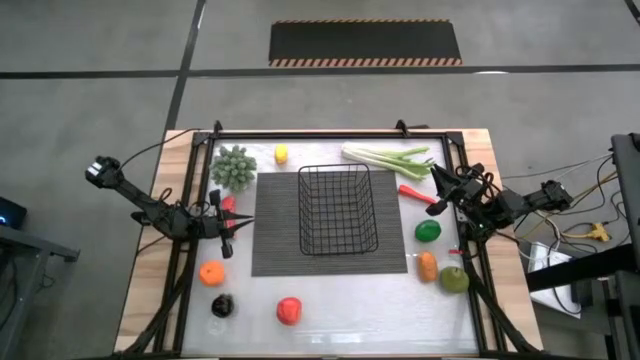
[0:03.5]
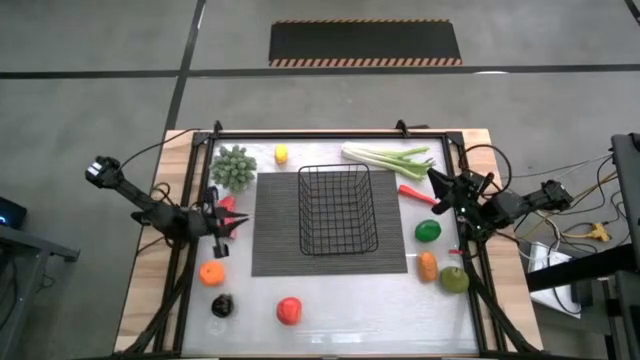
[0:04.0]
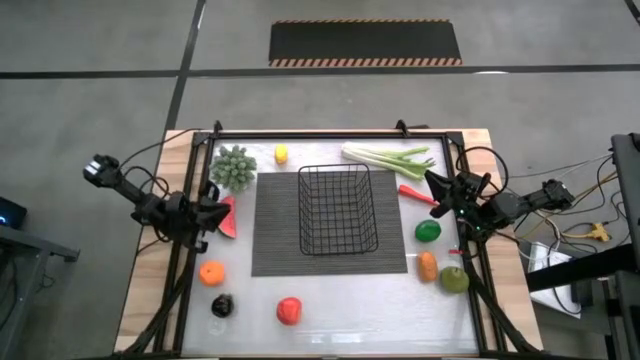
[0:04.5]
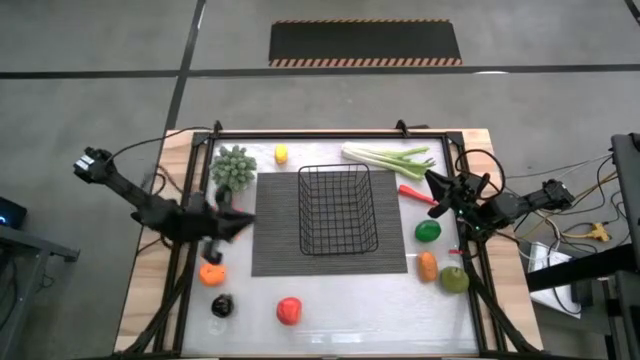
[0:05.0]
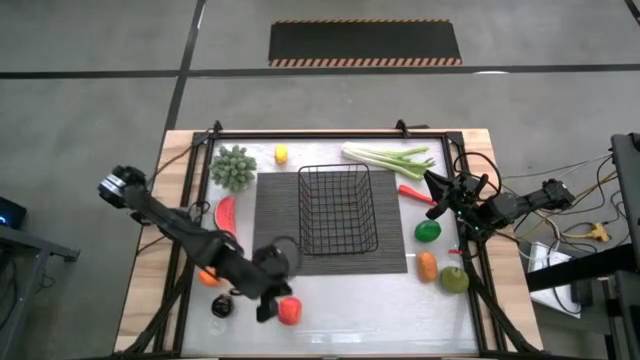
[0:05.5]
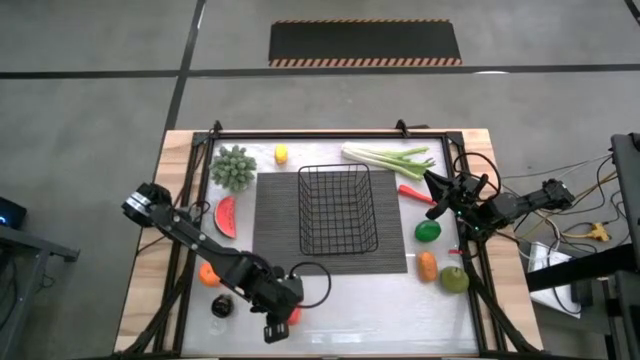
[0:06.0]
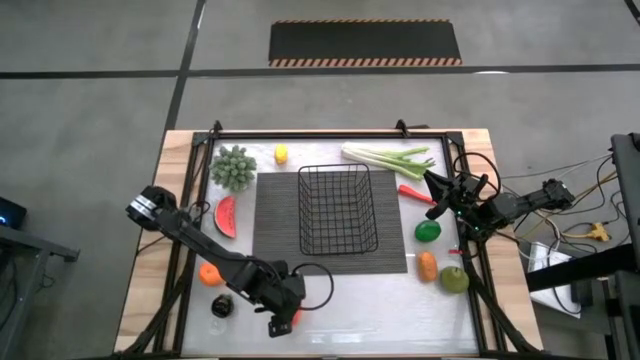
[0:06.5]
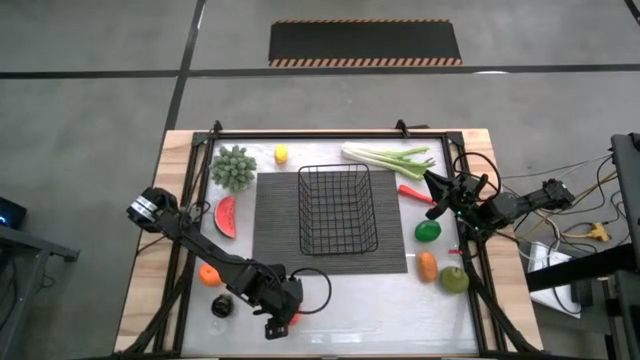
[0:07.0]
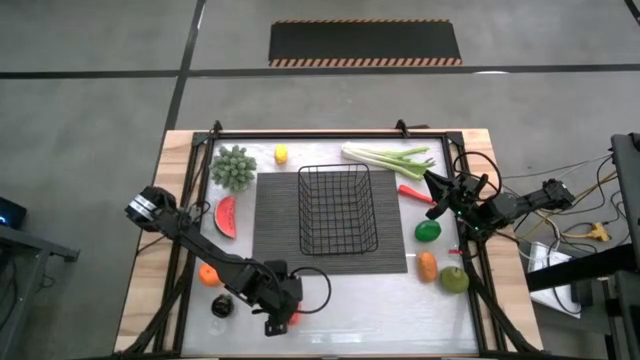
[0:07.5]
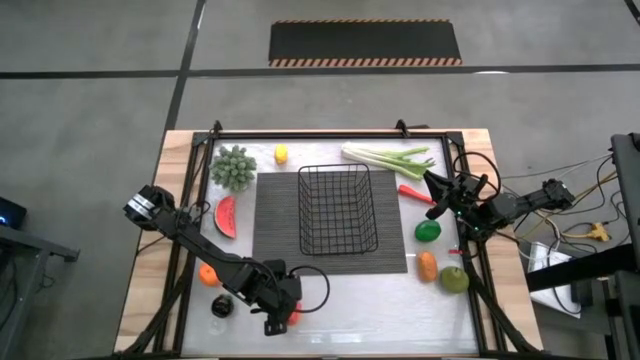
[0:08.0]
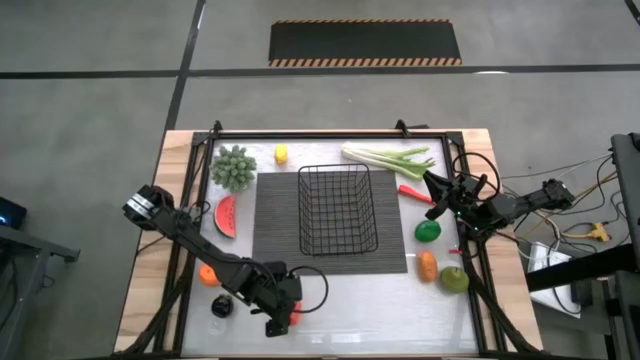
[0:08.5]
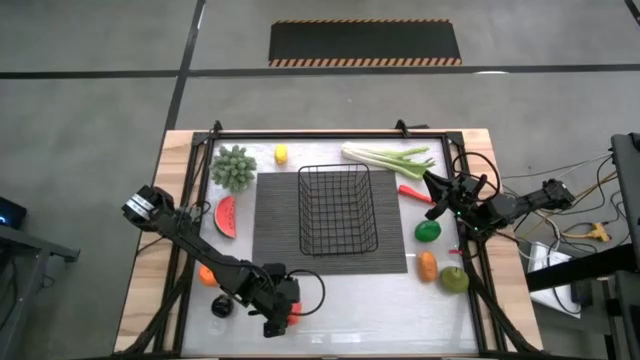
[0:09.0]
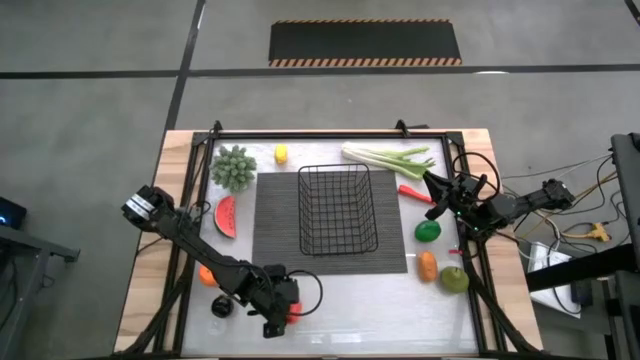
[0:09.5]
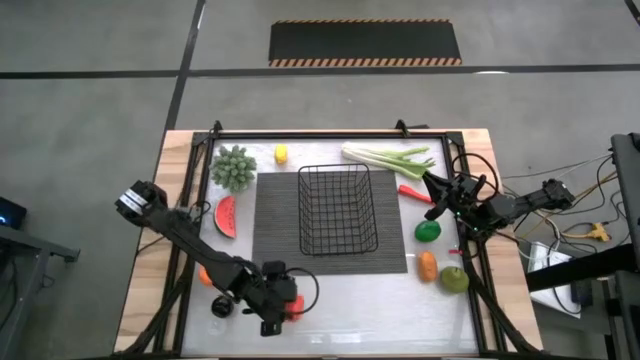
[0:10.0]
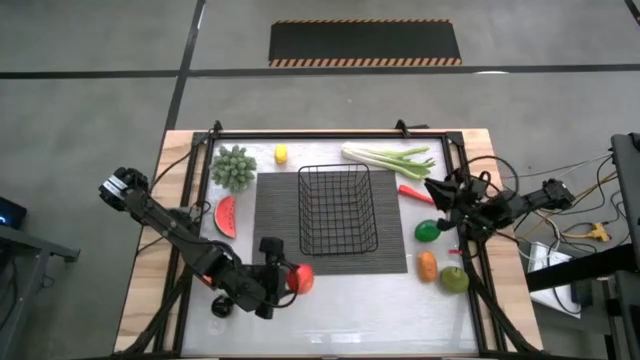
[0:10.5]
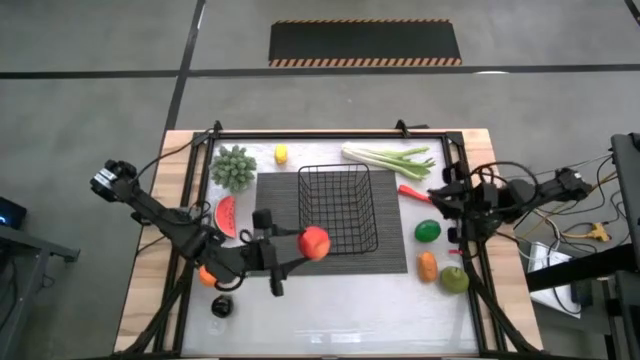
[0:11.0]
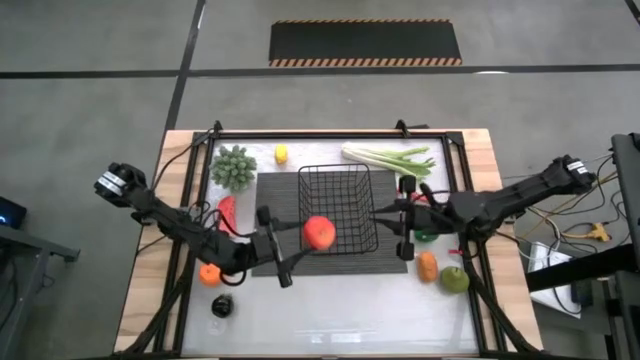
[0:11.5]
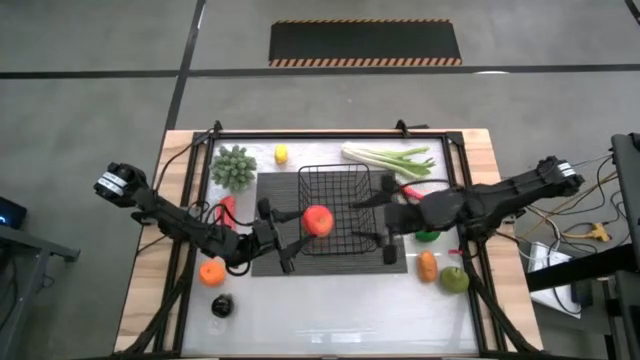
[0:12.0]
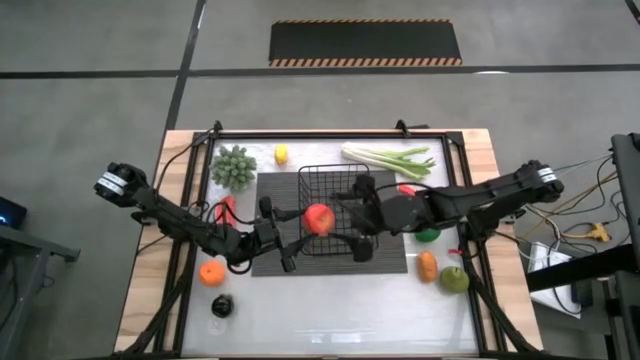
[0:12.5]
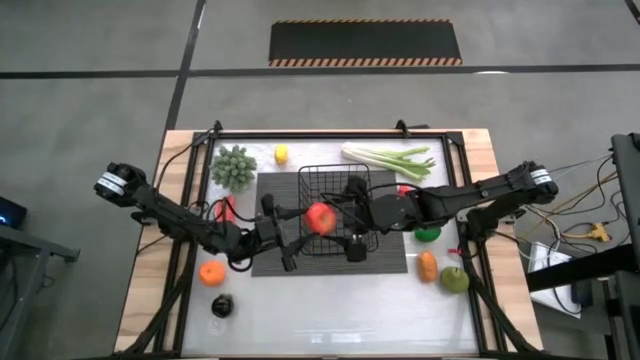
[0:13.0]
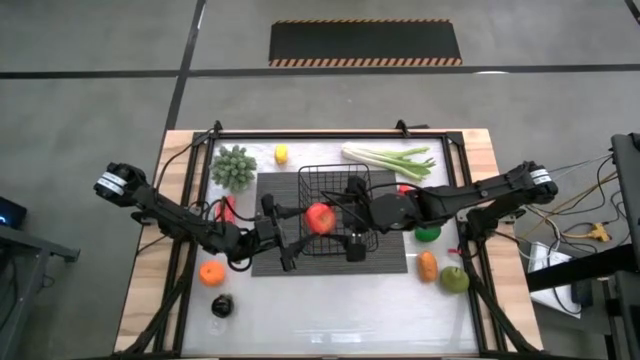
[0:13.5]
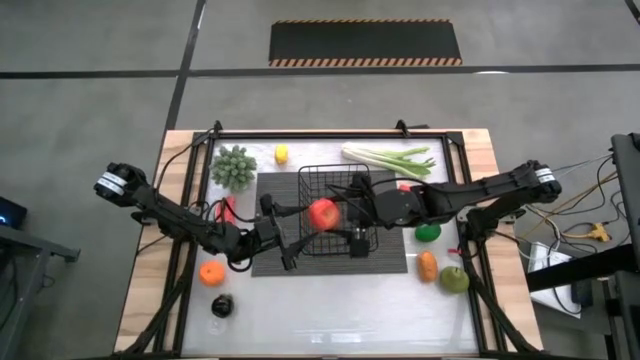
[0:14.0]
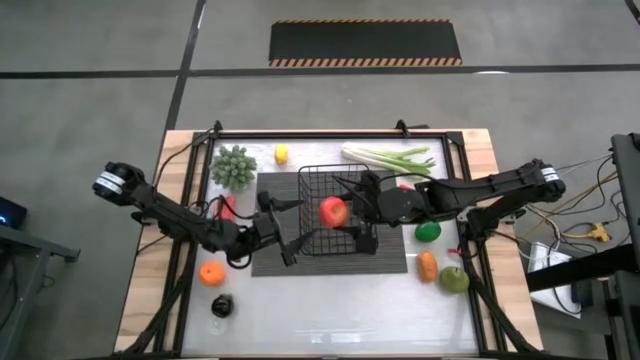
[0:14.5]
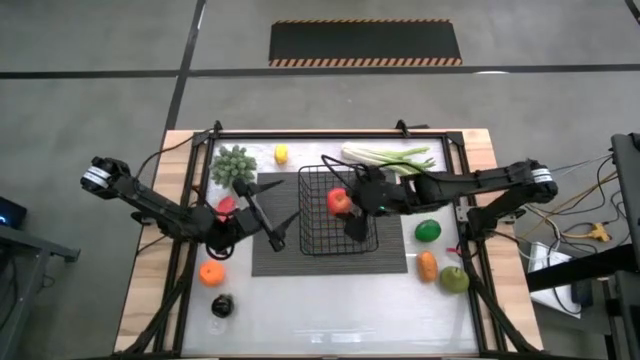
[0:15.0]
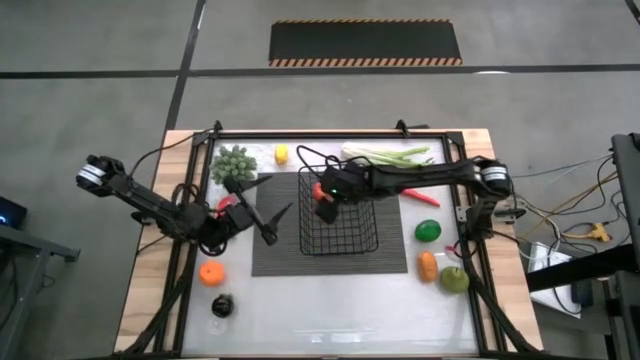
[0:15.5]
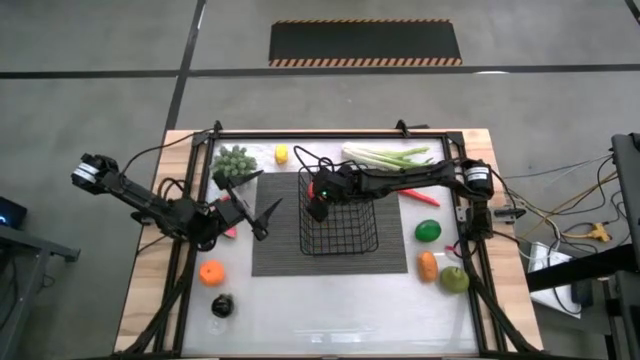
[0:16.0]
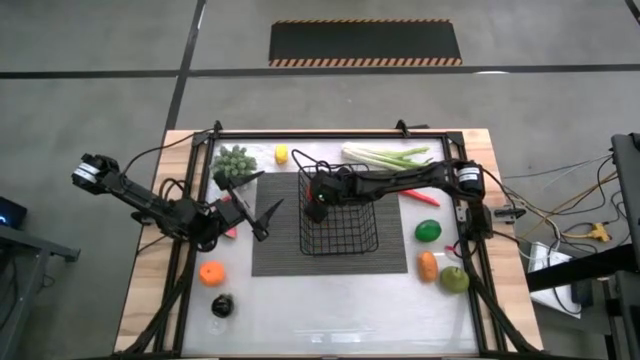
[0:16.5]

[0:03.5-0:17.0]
Task: Build produce basket
Put the red apple into the wire basket

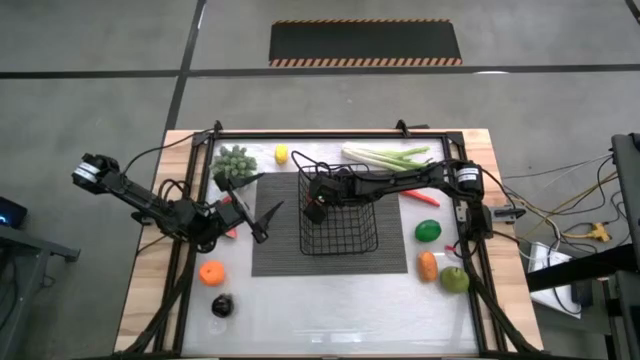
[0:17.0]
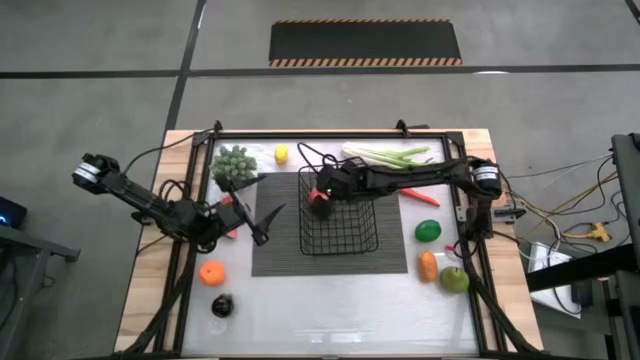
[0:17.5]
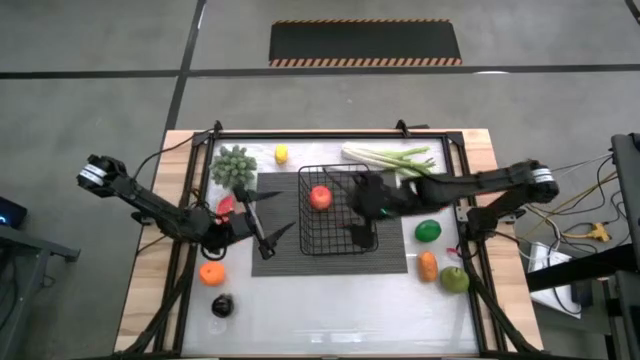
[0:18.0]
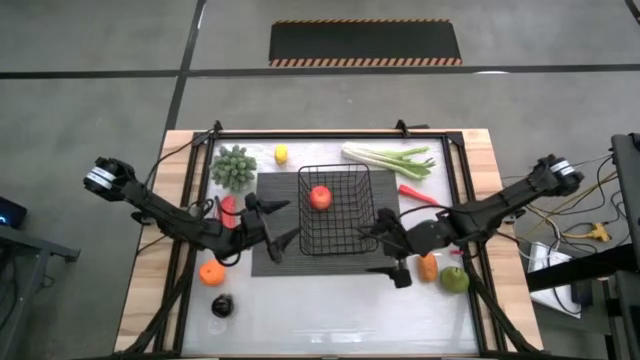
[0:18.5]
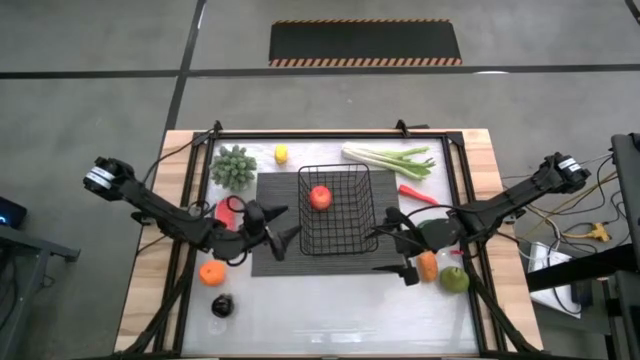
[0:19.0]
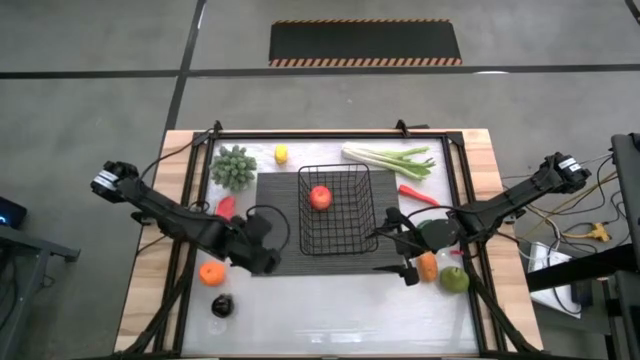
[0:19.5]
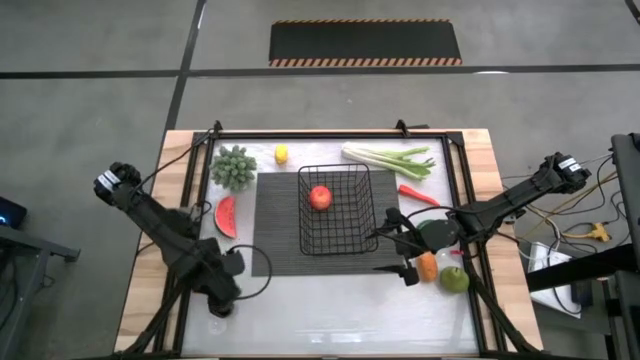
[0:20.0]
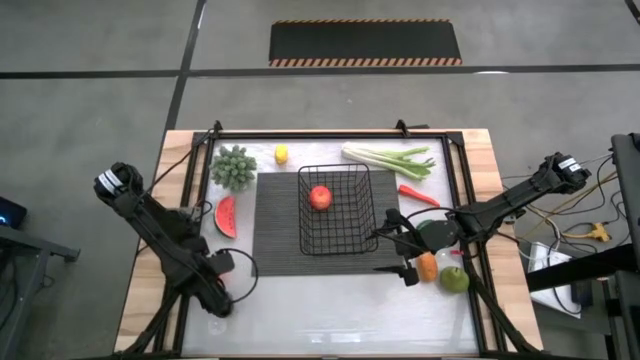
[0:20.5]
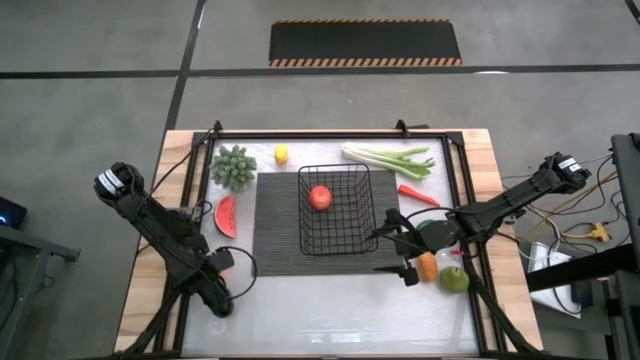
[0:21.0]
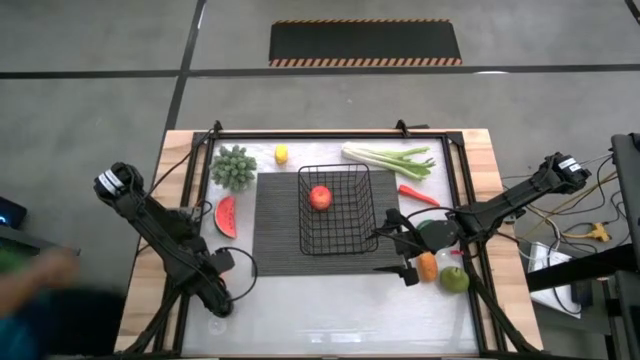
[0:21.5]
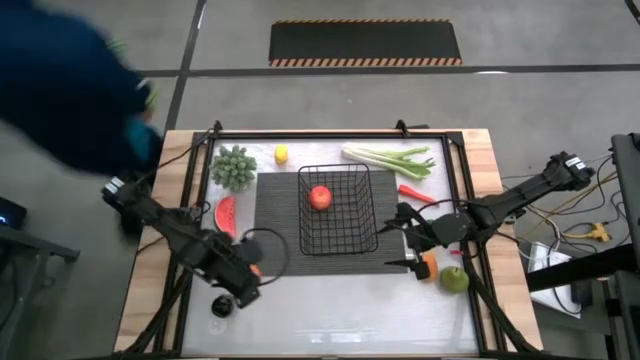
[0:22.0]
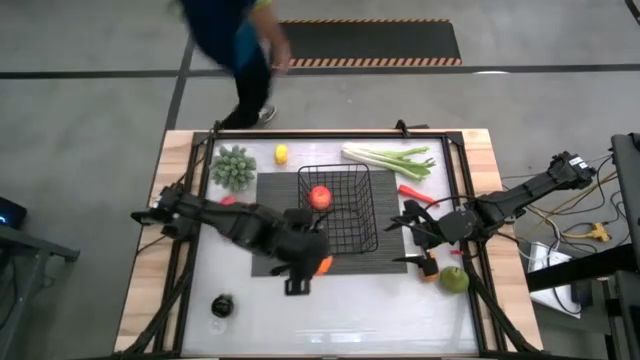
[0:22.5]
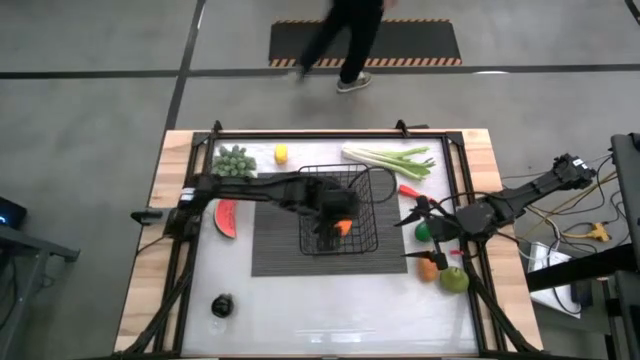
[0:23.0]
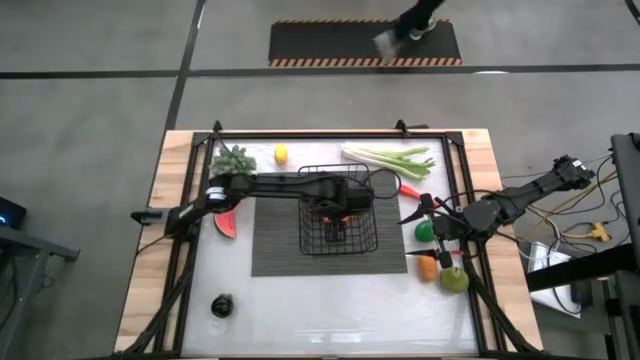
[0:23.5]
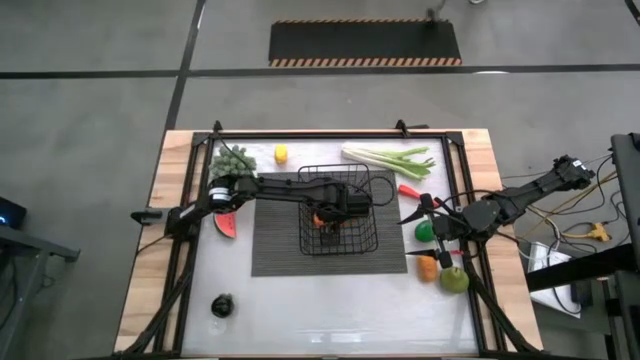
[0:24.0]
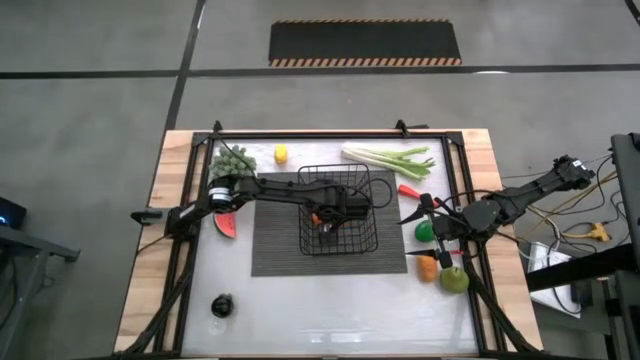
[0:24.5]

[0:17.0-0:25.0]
Put the orange into the wire basket

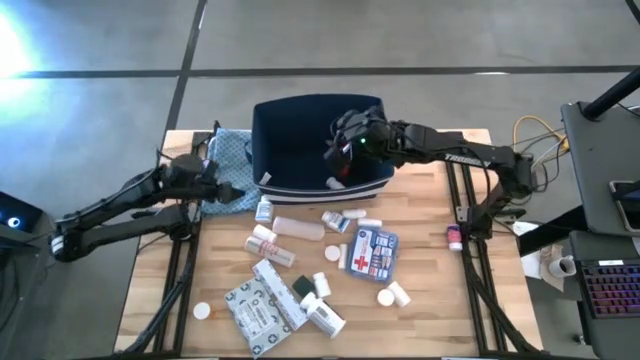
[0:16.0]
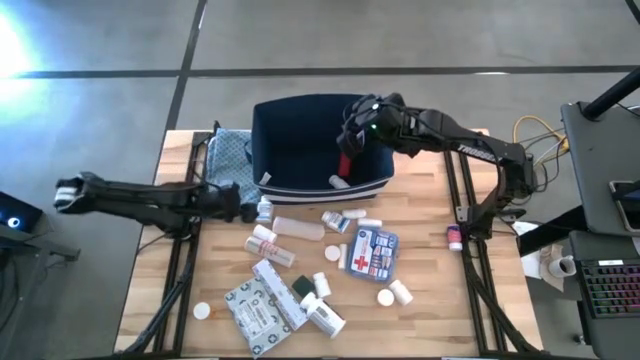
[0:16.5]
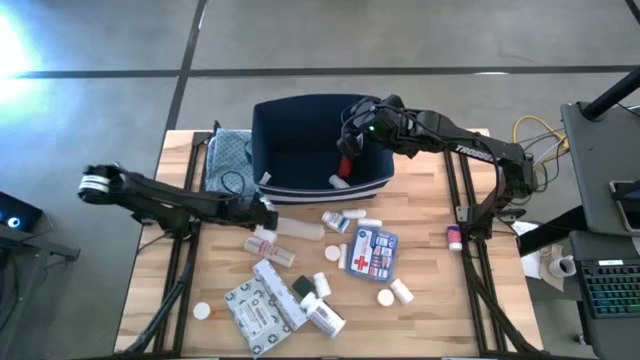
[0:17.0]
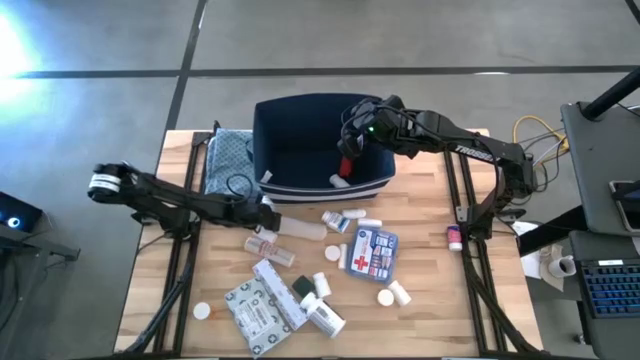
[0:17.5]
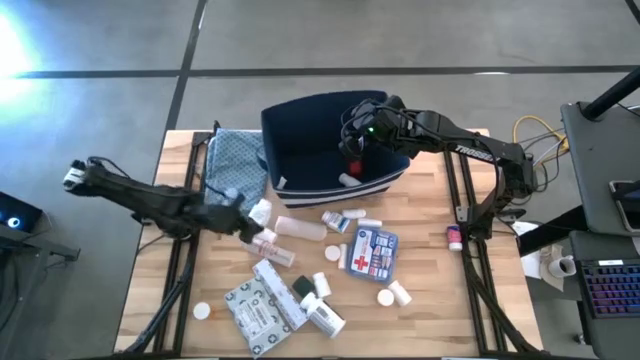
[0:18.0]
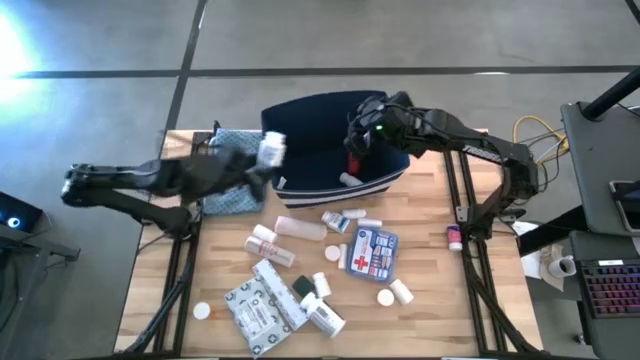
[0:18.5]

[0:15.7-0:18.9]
Task: Pick & place medical supplies in basket/bin
Put the blue pill bottle into the blue bin
